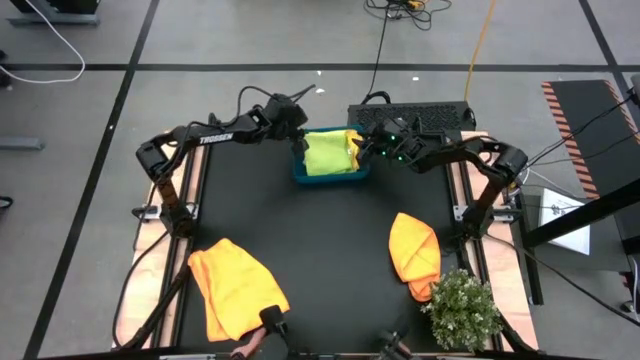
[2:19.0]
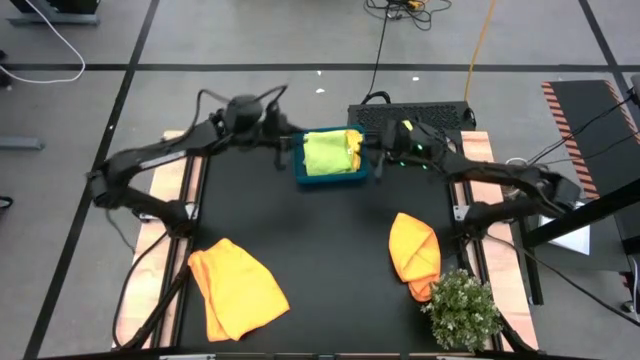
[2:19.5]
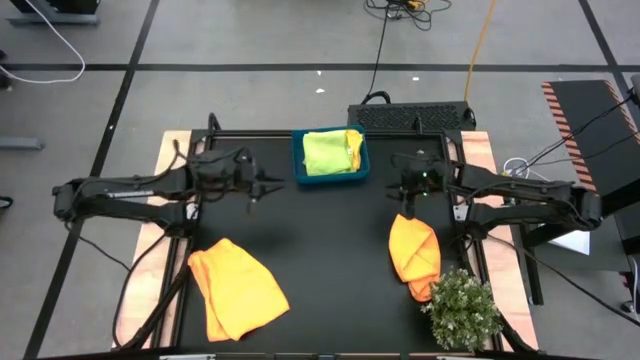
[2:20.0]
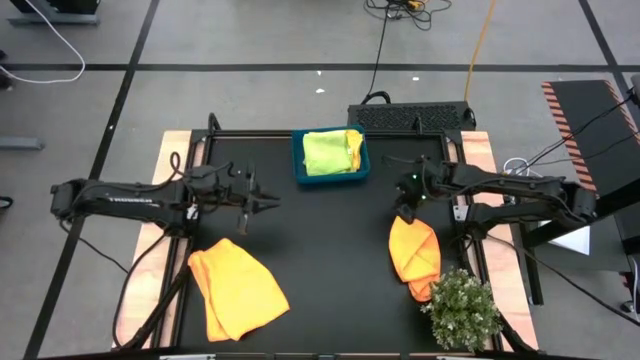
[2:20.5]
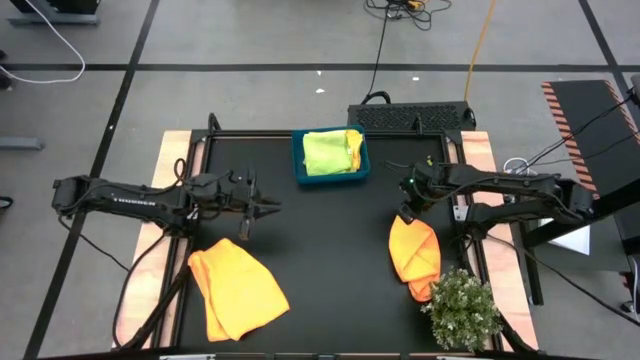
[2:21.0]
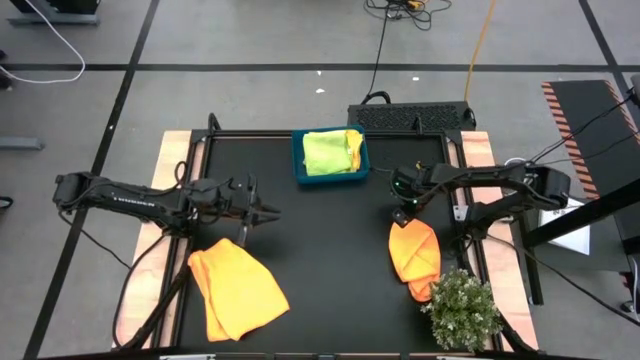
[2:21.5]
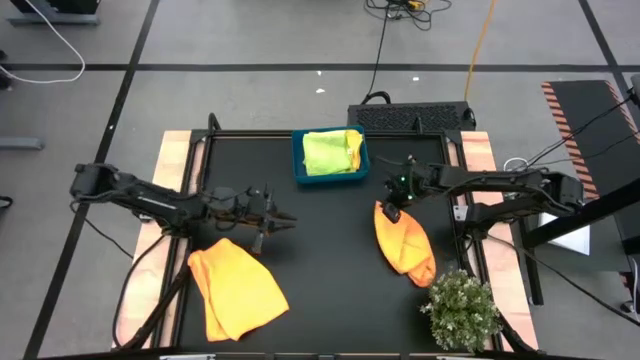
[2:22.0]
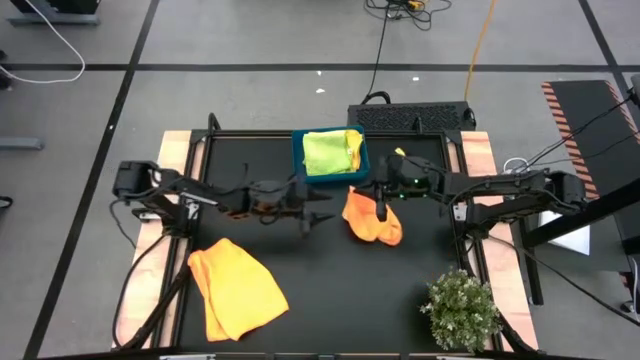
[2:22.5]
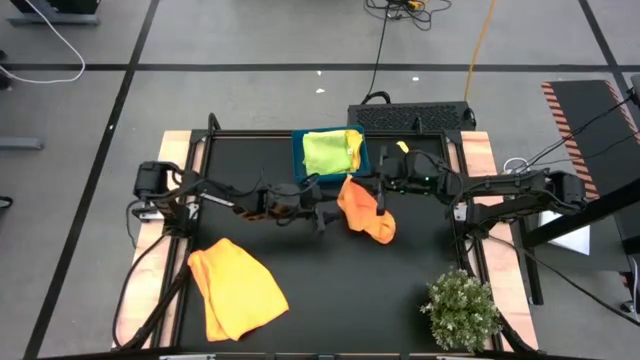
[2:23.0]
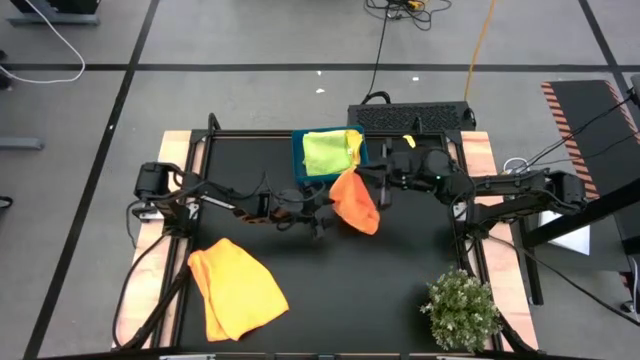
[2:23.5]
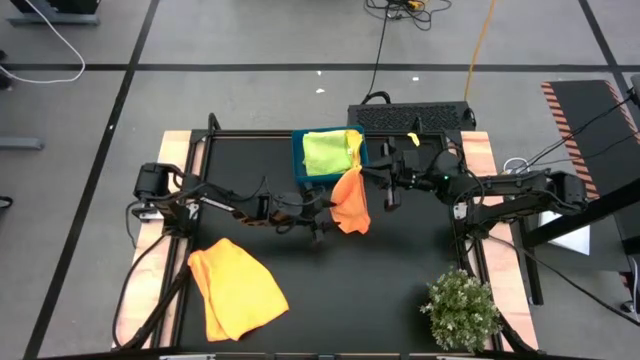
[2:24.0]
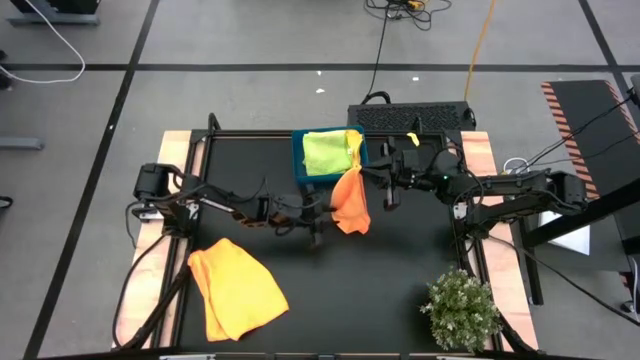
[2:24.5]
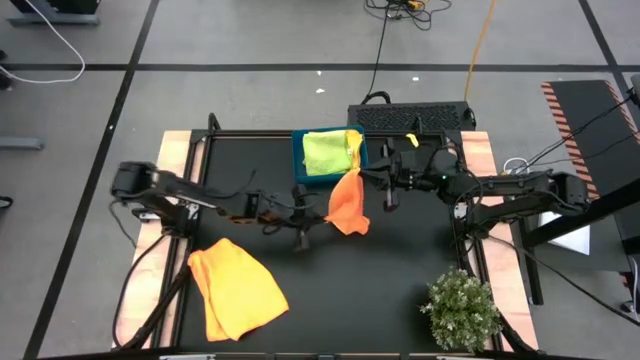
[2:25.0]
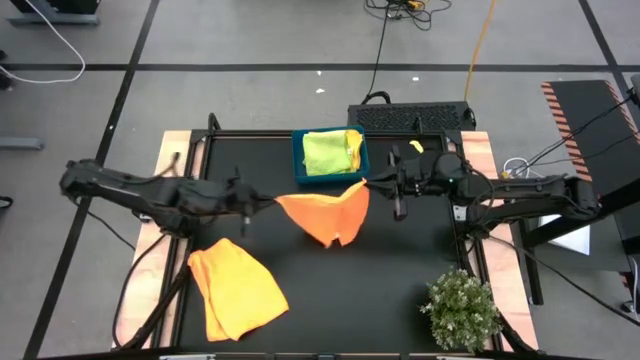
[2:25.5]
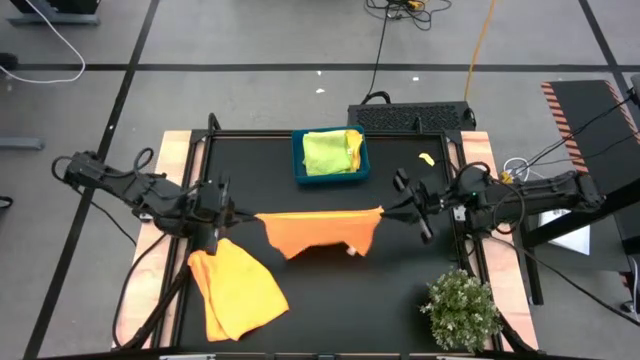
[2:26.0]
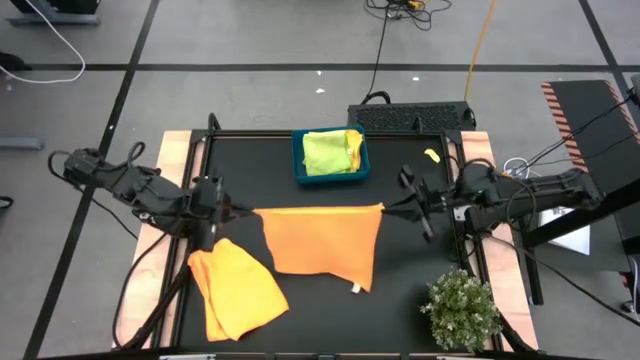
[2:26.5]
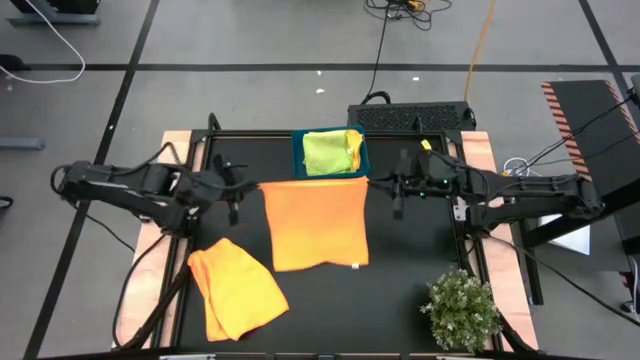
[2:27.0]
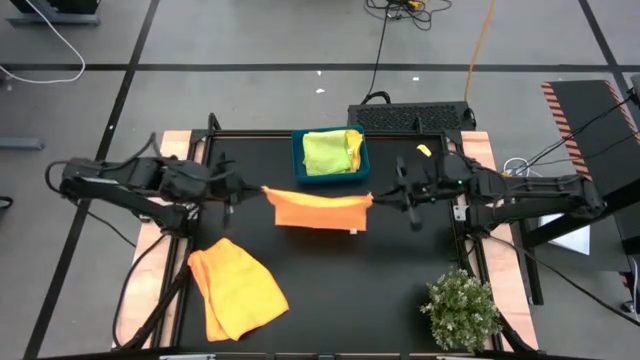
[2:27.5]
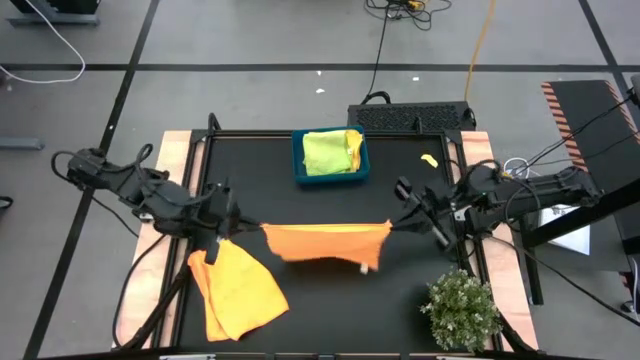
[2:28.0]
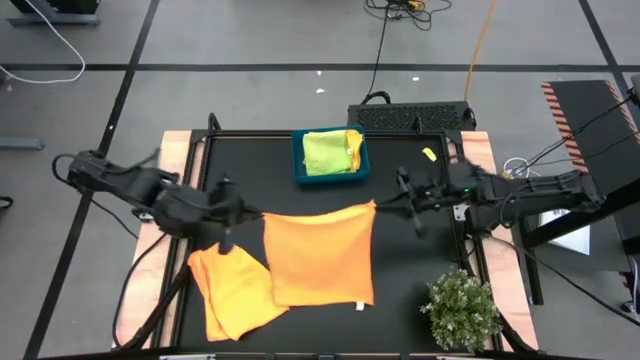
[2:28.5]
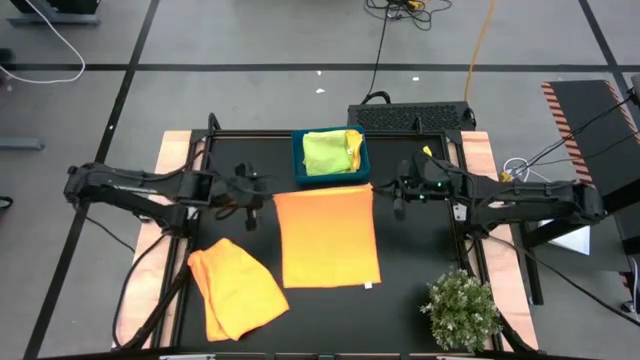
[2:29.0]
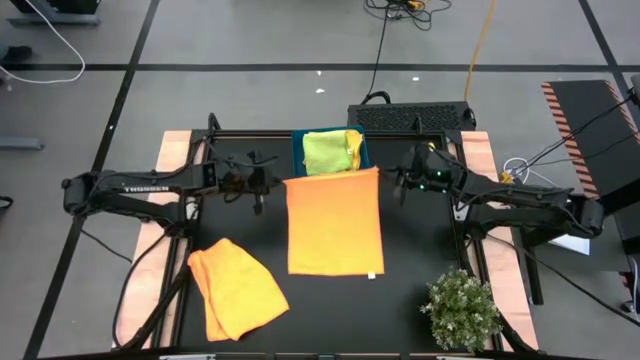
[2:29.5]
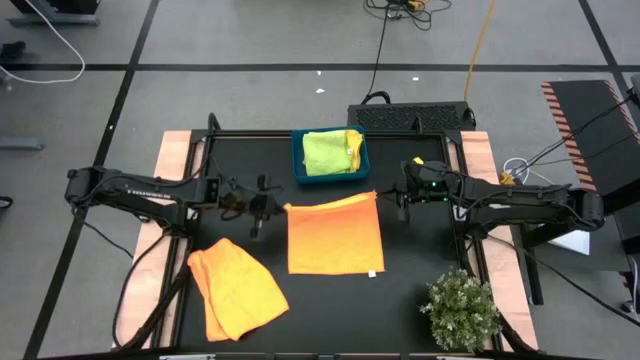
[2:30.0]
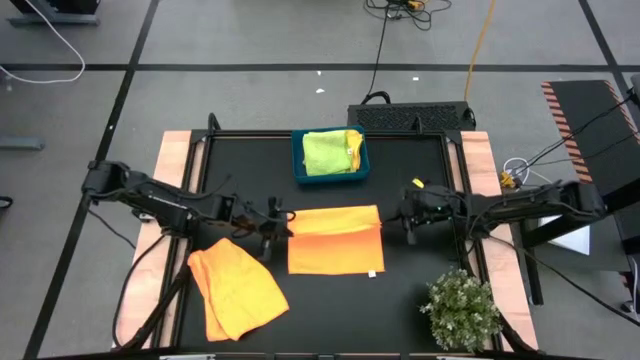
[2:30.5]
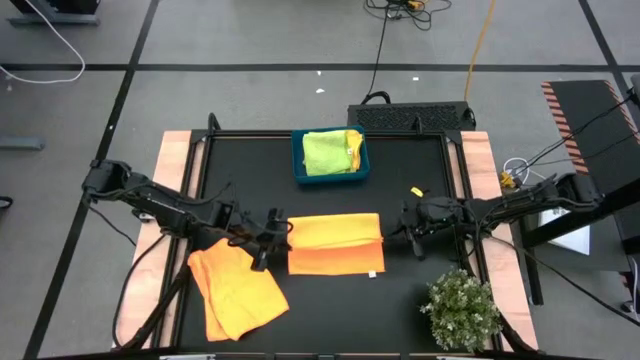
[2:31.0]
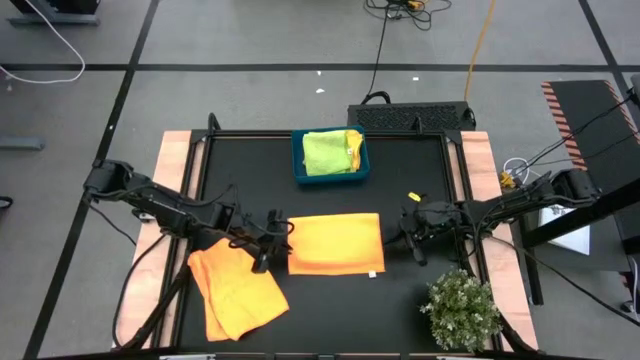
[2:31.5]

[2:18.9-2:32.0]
Task: Fold microfiber towels
Fold the right orange microfiber towel

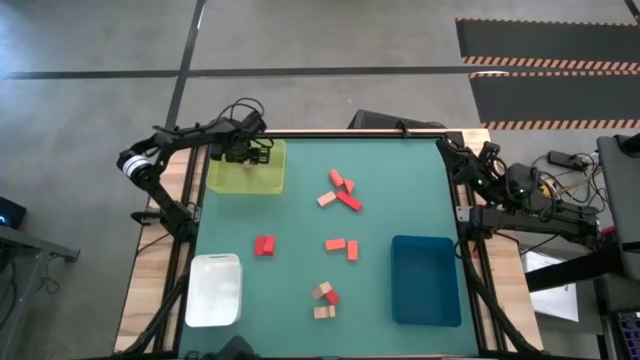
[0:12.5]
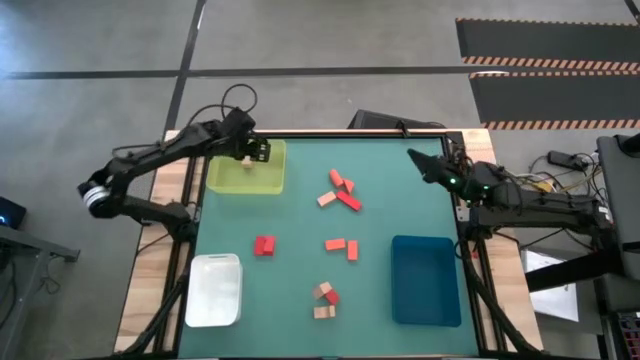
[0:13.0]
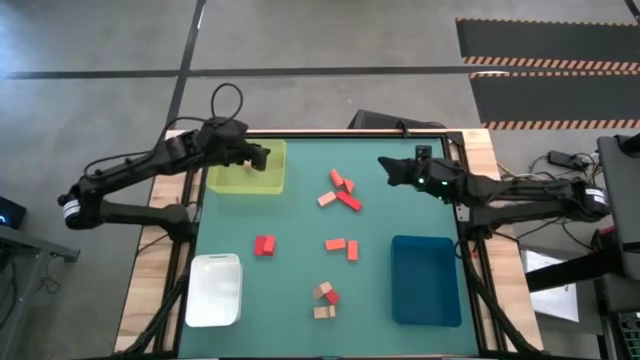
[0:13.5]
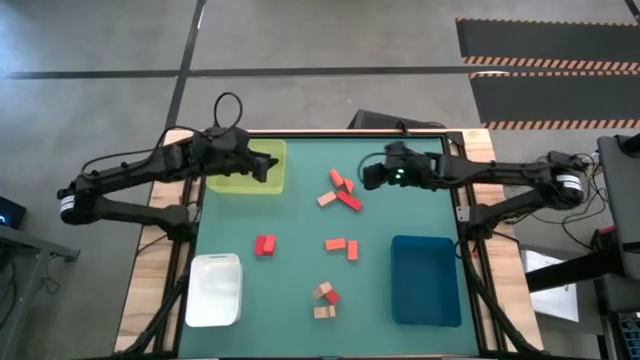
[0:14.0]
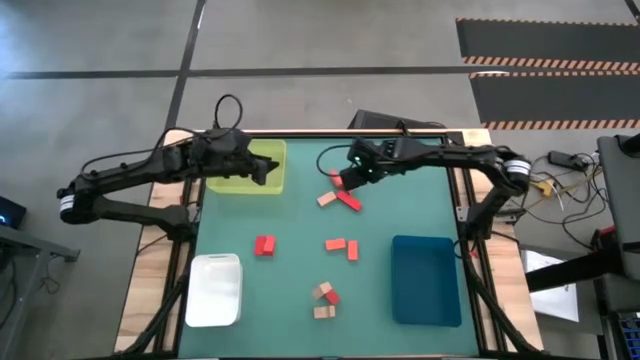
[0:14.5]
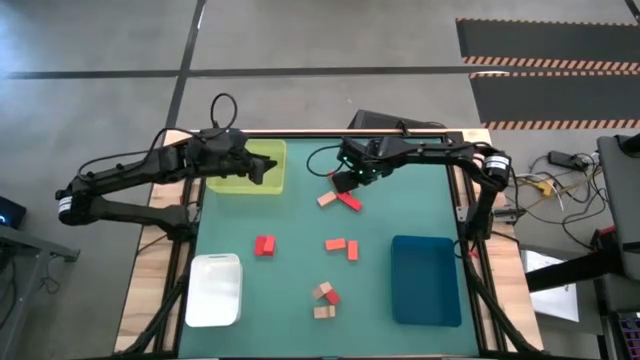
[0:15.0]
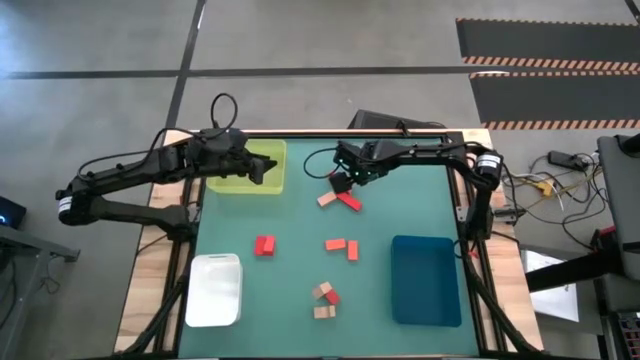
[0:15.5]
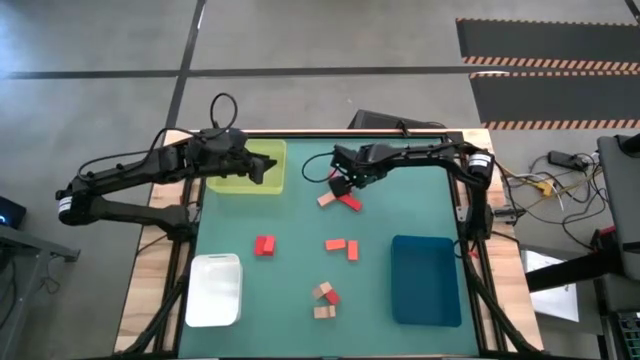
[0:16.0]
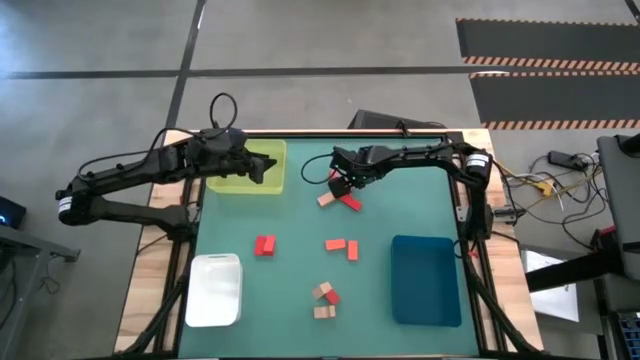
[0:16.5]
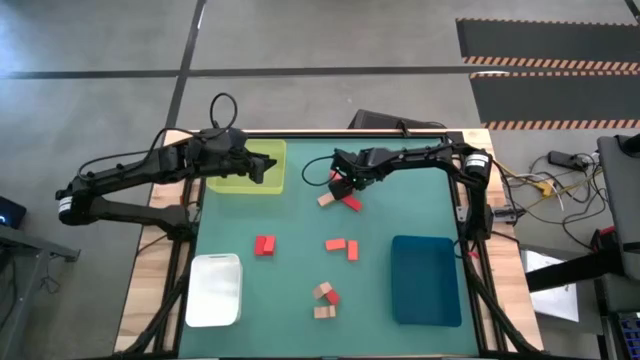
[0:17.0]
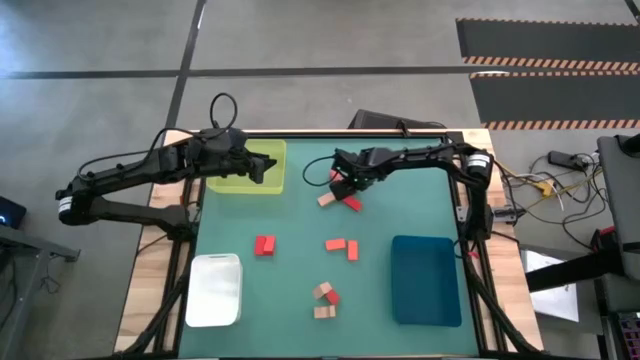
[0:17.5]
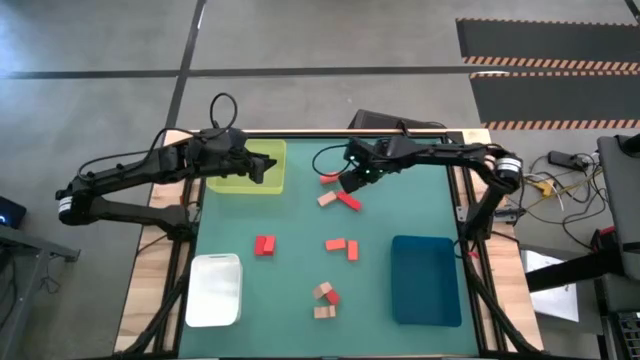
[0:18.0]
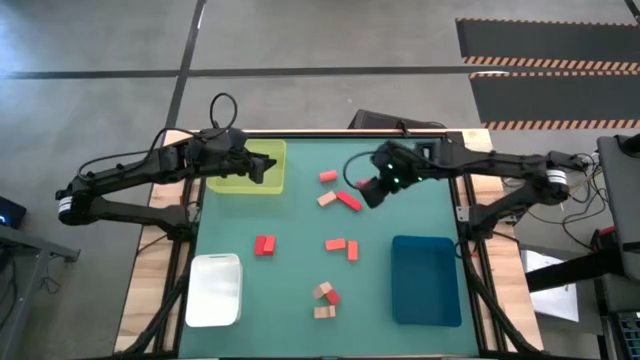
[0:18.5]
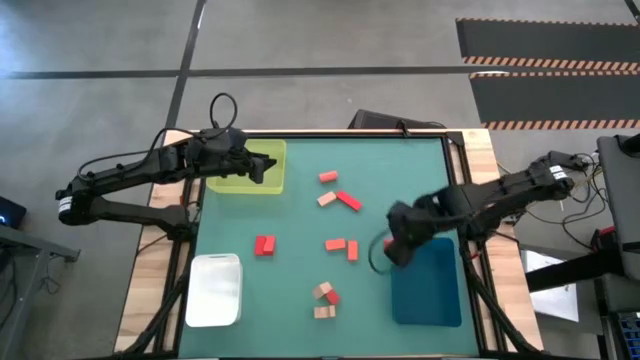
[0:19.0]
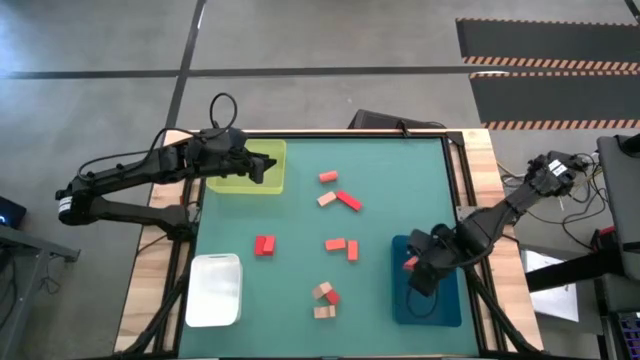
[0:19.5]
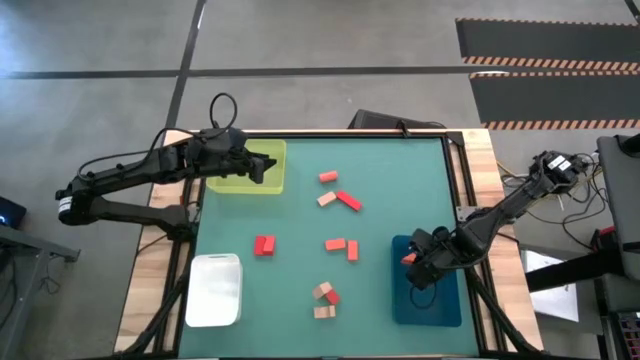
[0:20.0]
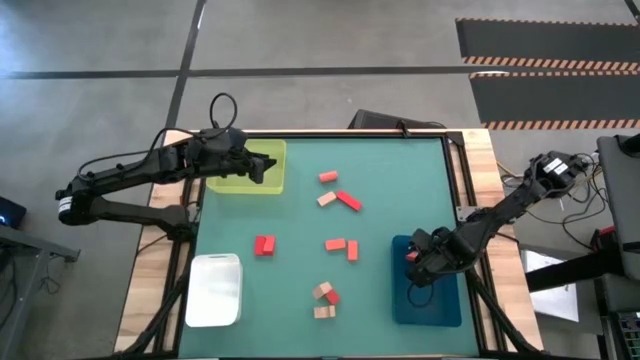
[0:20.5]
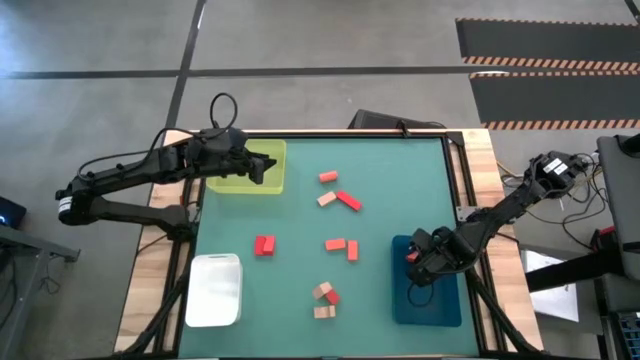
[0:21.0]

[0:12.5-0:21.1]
Task: Sort & place blocks by color
Put the orange block into the blue bin
